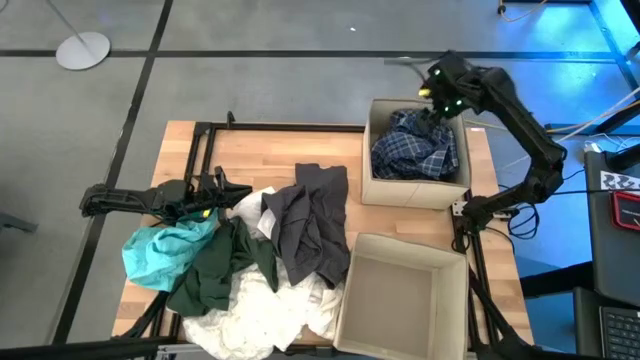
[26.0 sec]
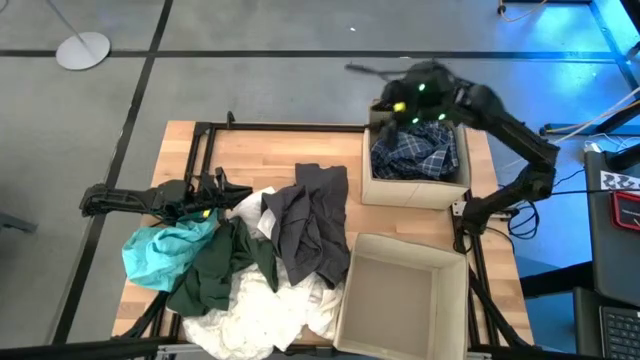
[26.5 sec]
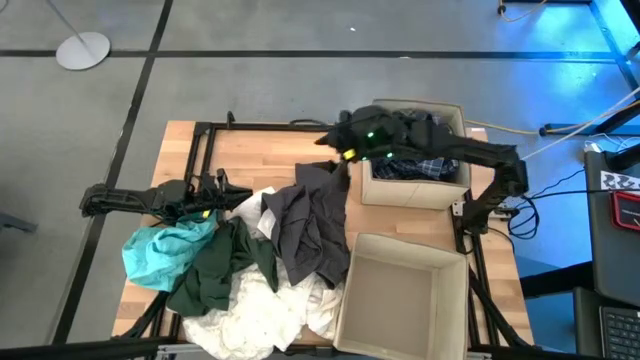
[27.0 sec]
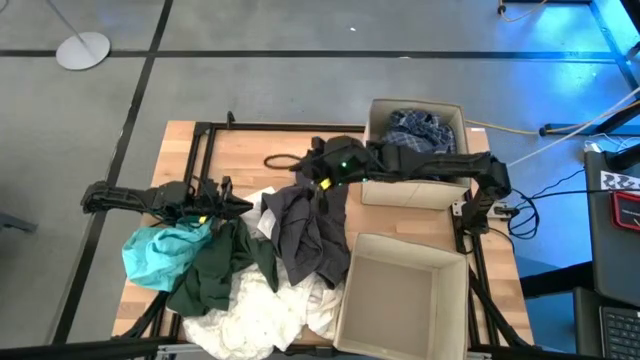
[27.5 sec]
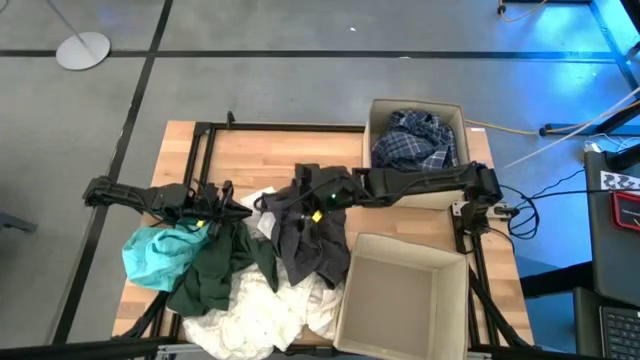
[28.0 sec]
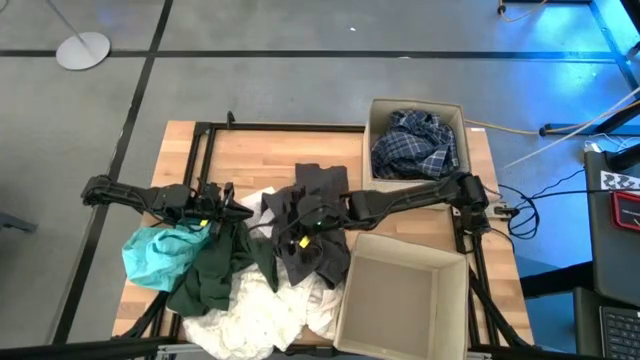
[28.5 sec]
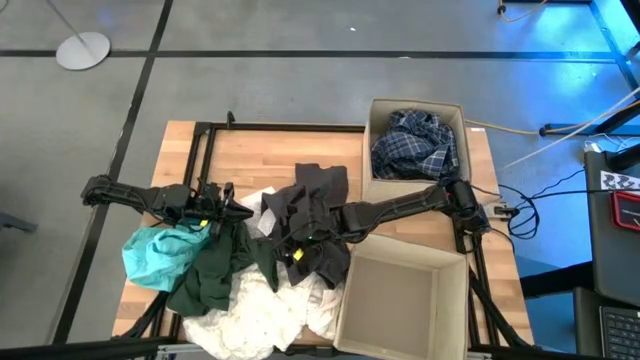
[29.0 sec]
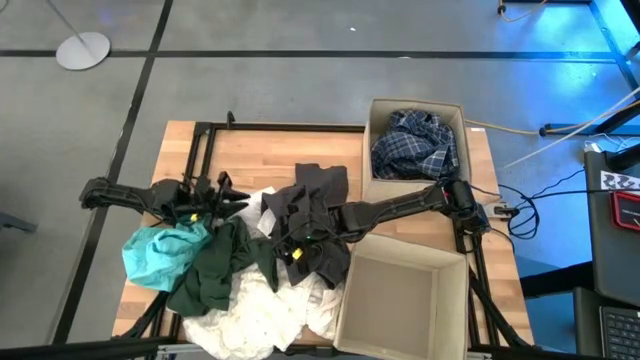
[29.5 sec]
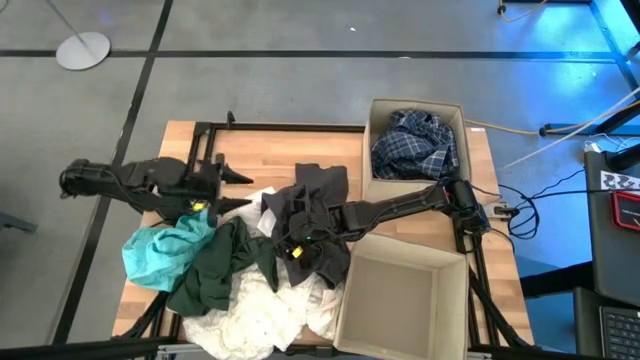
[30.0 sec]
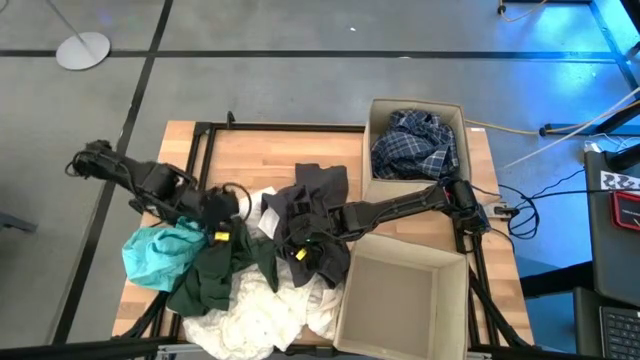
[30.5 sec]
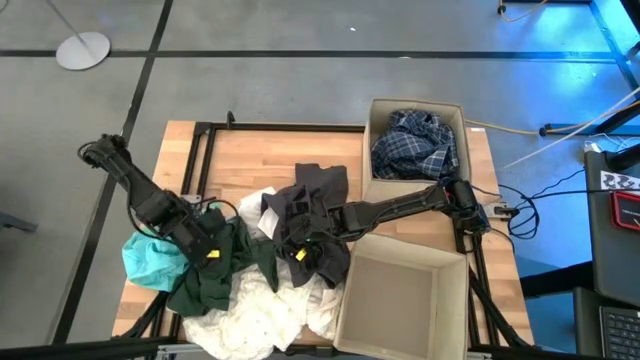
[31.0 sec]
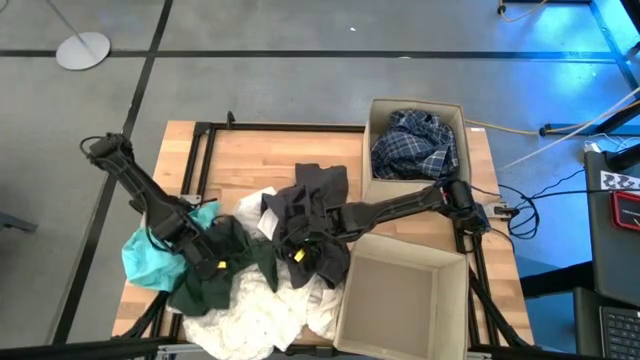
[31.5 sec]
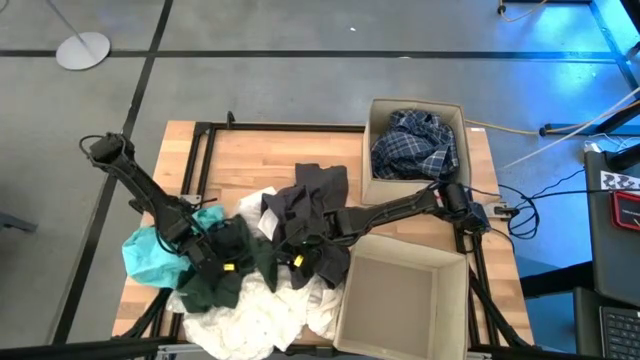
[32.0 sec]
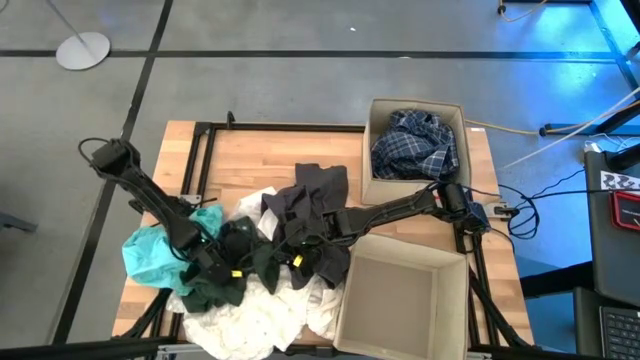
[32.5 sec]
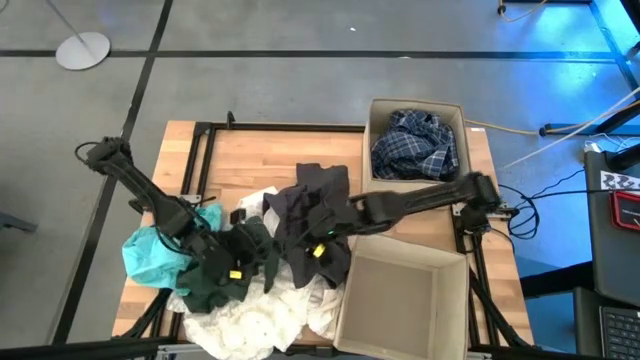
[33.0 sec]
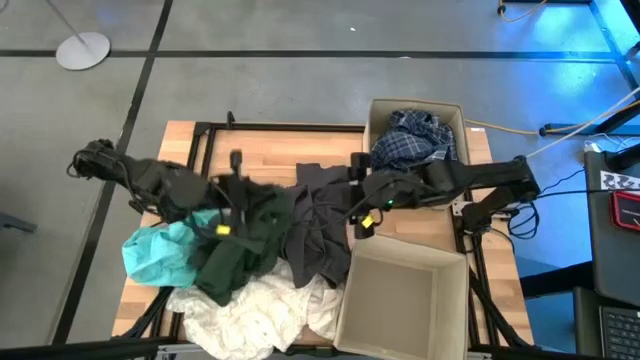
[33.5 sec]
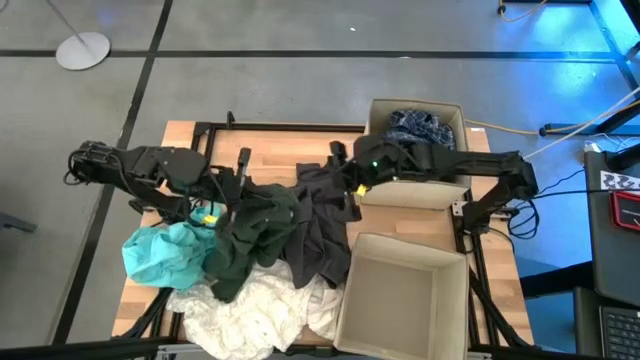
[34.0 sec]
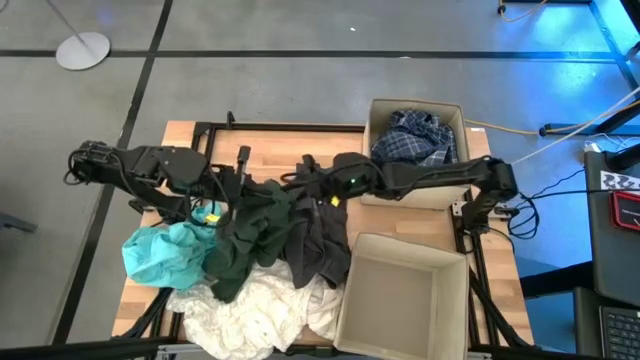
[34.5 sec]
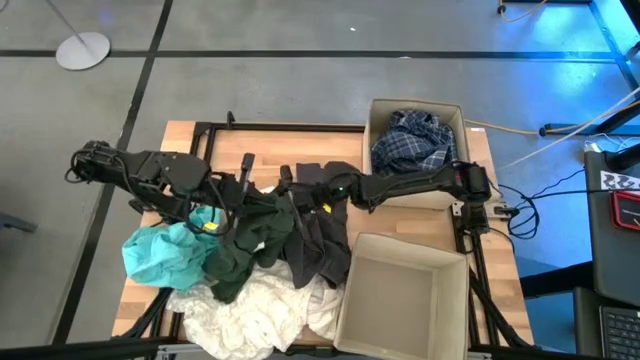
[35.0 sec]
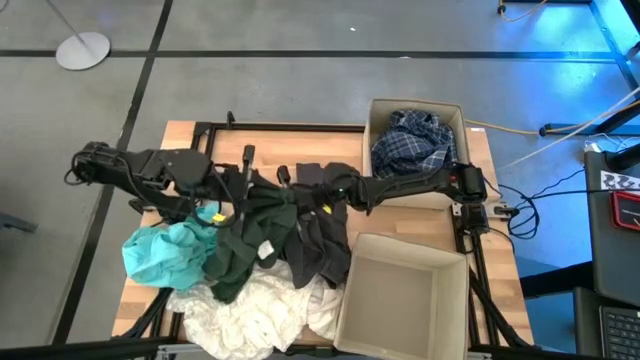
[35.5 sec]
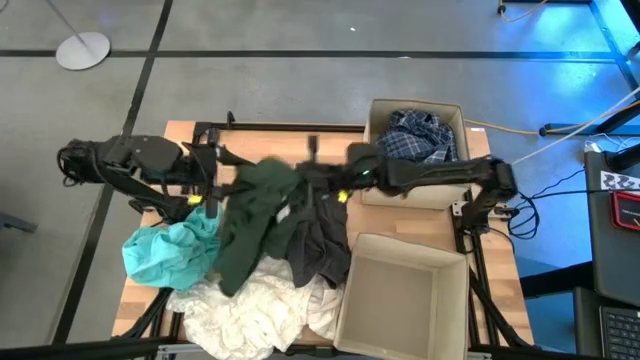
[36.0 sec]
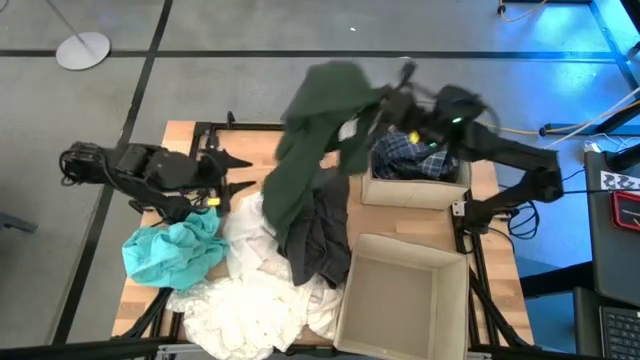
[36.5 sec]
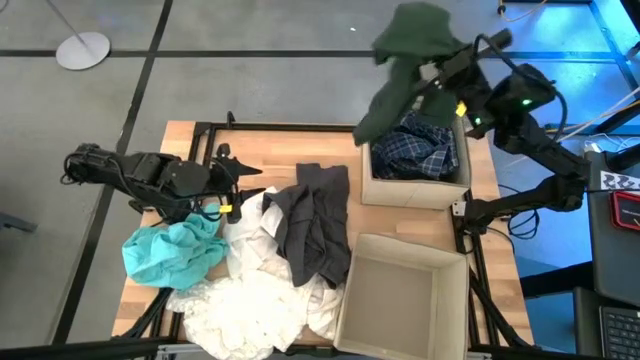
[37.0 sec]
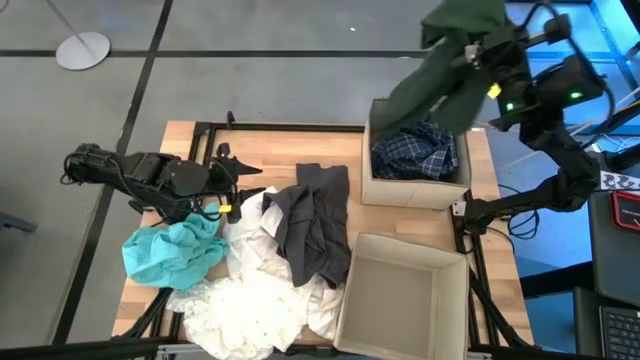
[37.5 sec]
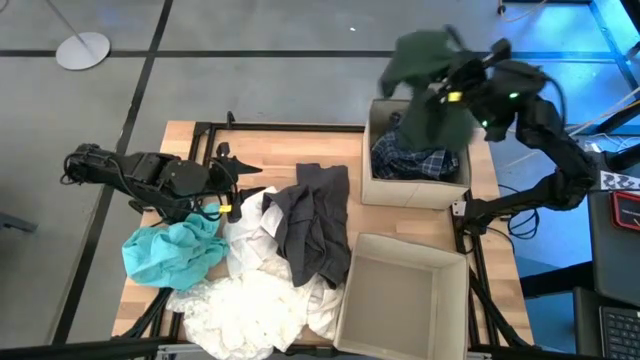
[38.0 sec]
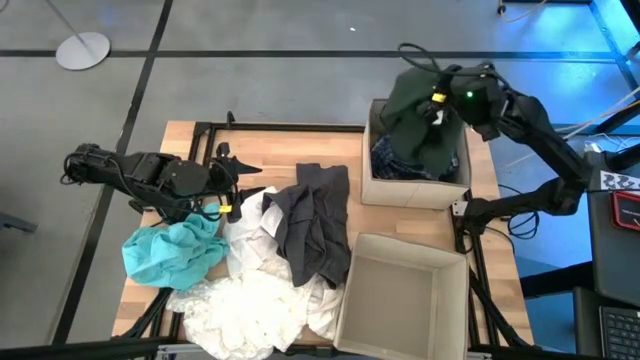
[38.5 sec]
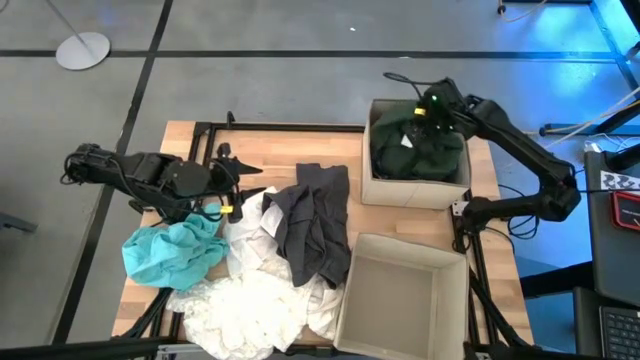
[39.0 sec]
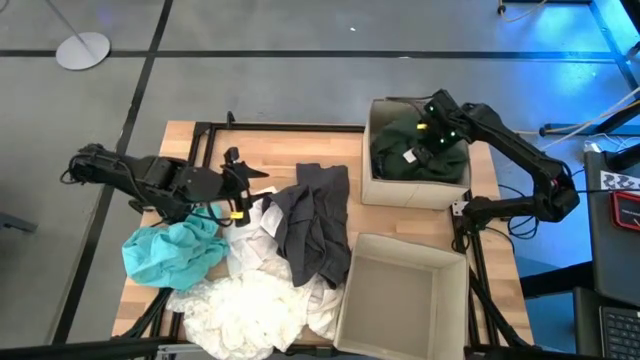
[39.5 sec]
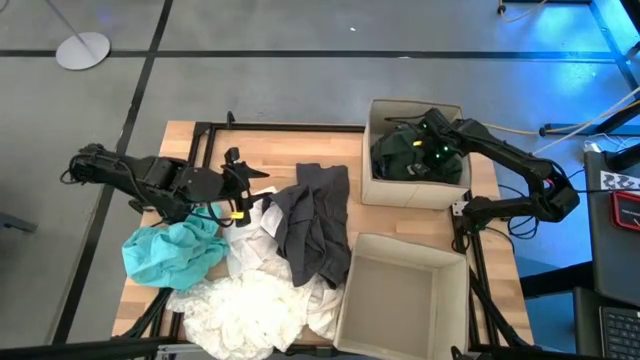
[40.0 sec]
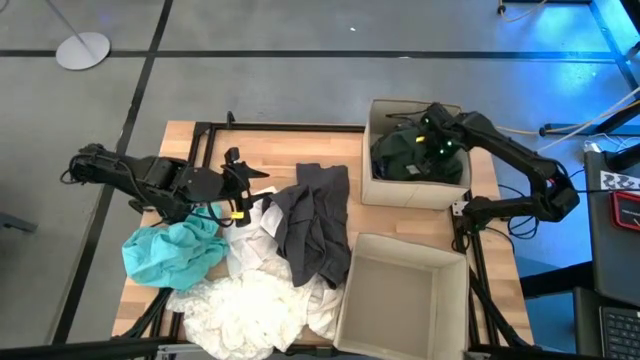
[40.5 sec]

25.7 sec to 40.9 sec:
Task: Sort clothes
Put the green sweater into the top laundry organizer
